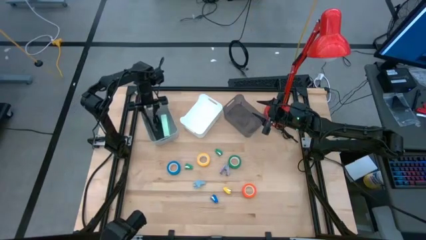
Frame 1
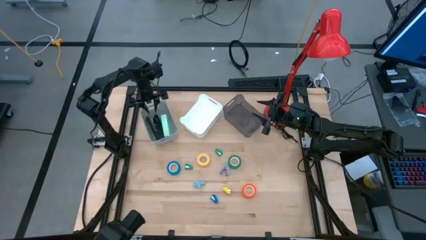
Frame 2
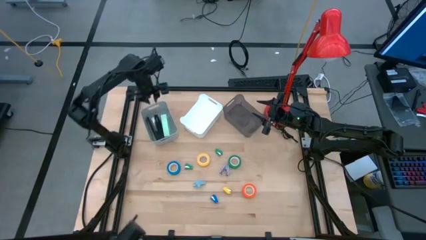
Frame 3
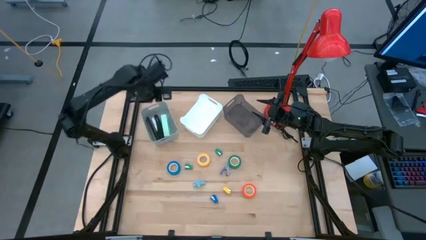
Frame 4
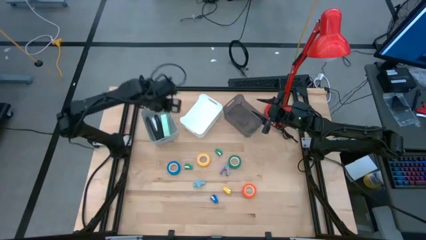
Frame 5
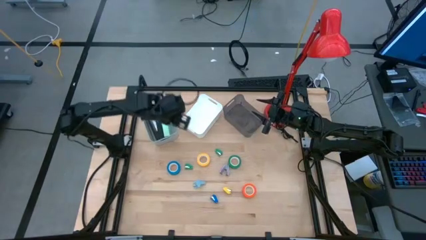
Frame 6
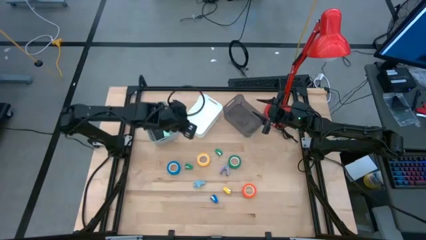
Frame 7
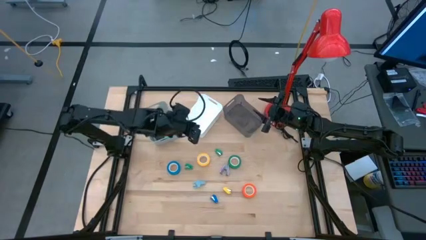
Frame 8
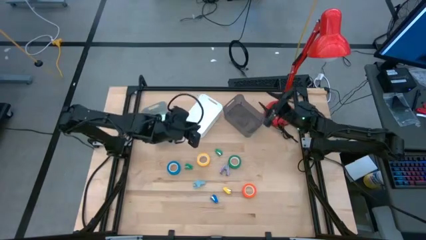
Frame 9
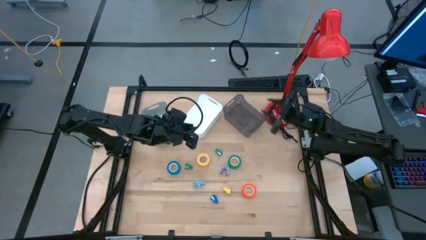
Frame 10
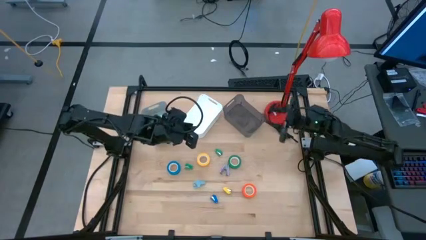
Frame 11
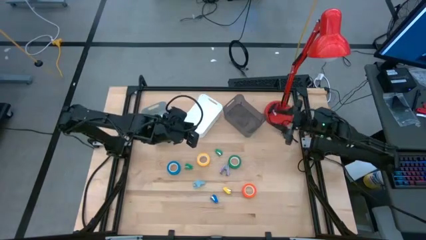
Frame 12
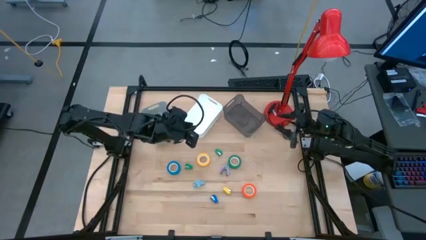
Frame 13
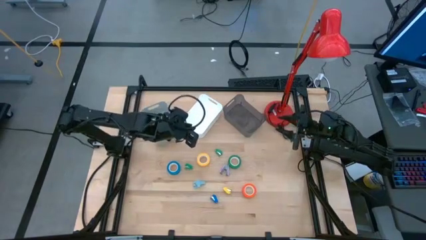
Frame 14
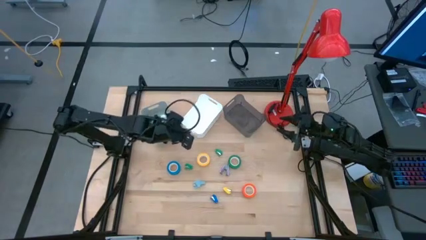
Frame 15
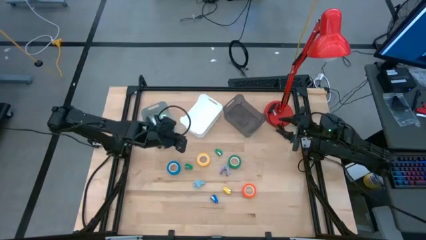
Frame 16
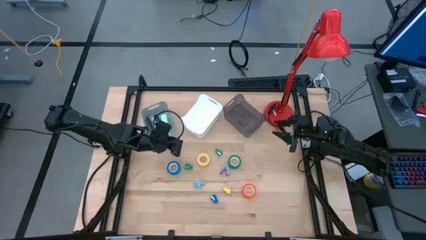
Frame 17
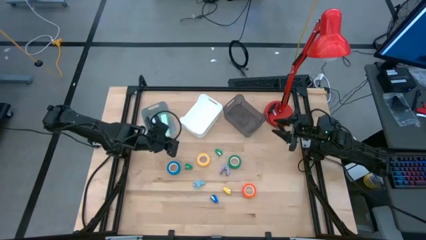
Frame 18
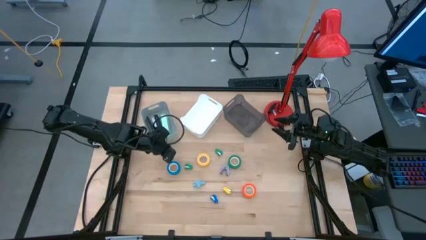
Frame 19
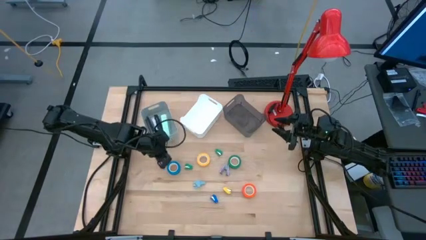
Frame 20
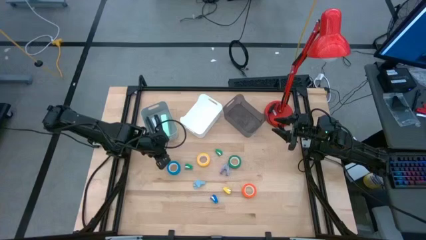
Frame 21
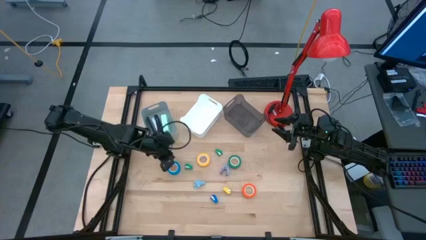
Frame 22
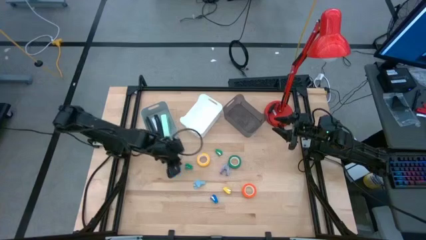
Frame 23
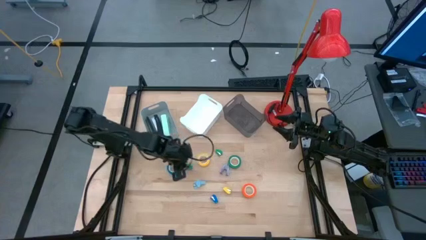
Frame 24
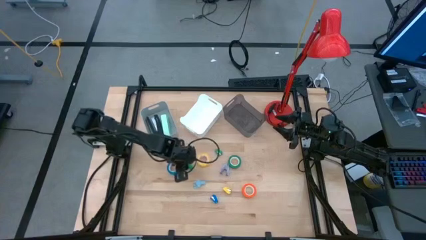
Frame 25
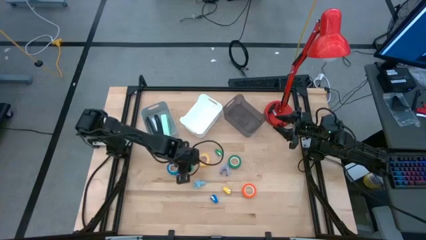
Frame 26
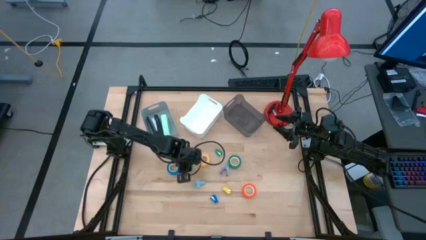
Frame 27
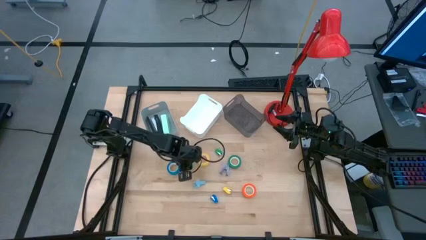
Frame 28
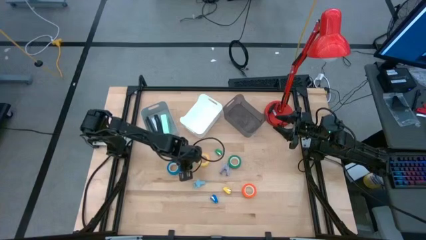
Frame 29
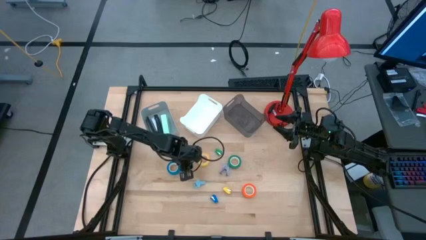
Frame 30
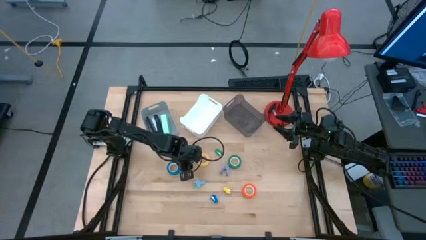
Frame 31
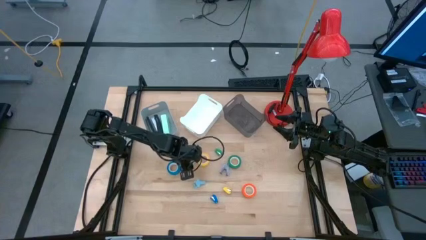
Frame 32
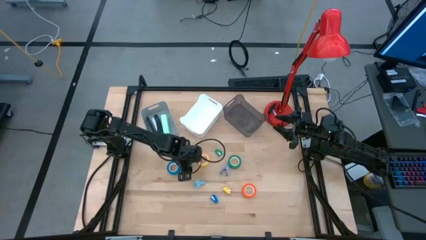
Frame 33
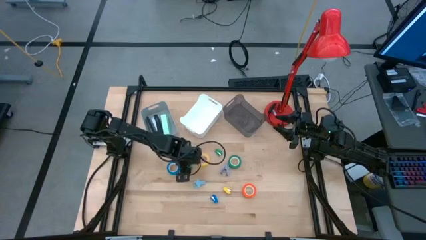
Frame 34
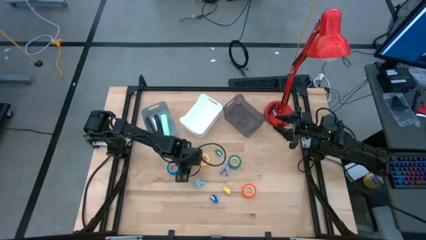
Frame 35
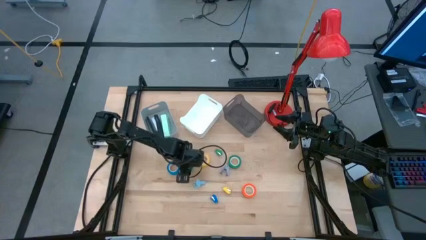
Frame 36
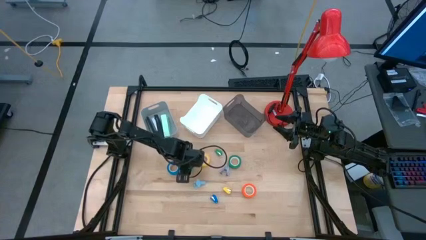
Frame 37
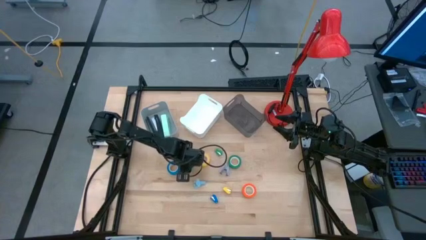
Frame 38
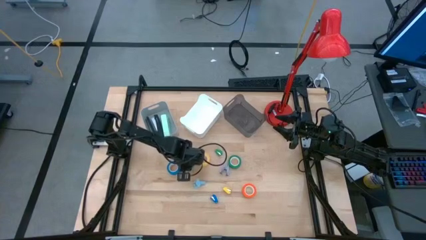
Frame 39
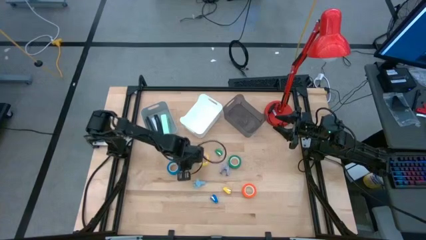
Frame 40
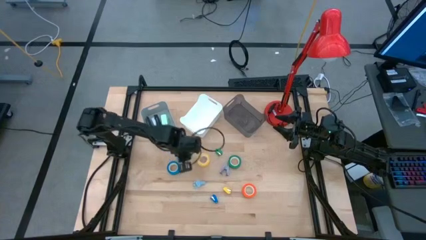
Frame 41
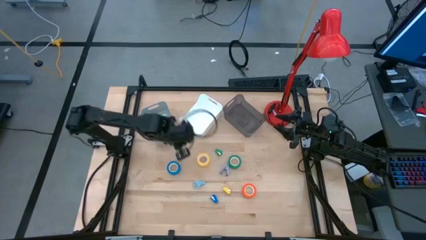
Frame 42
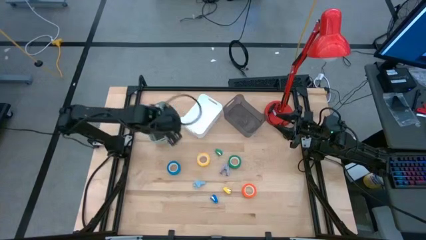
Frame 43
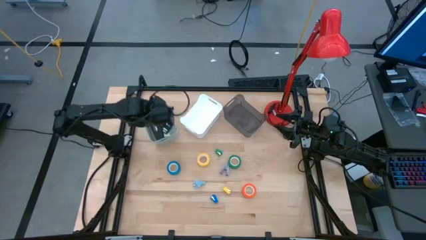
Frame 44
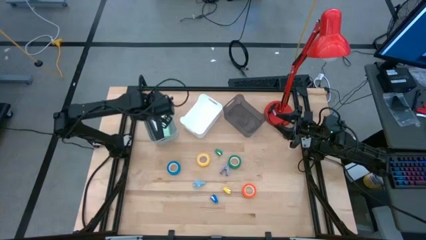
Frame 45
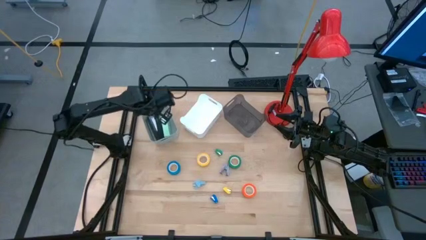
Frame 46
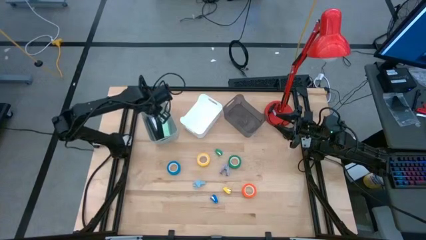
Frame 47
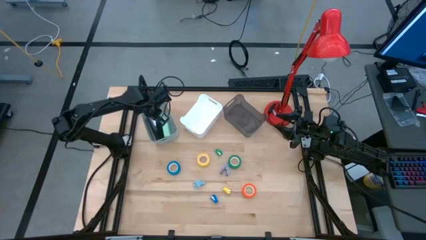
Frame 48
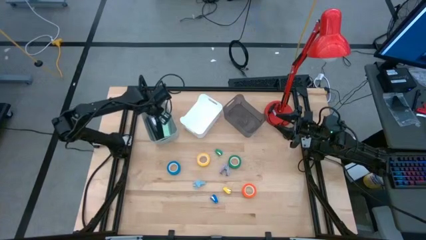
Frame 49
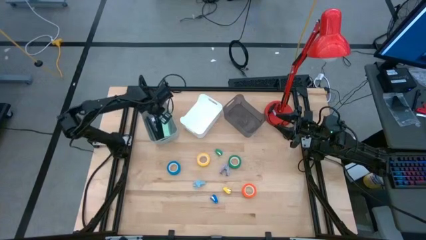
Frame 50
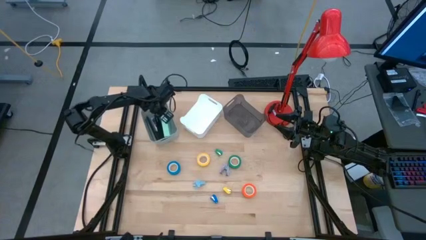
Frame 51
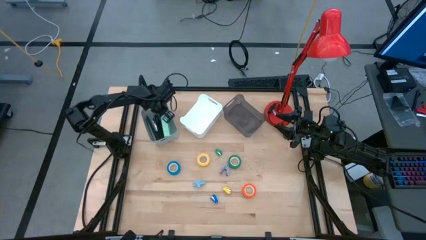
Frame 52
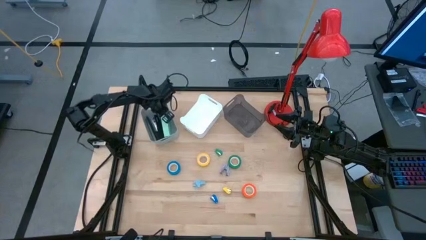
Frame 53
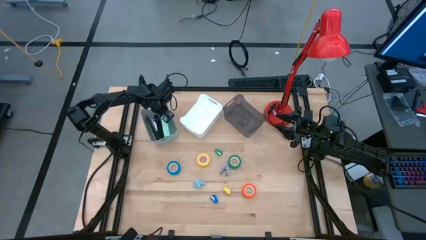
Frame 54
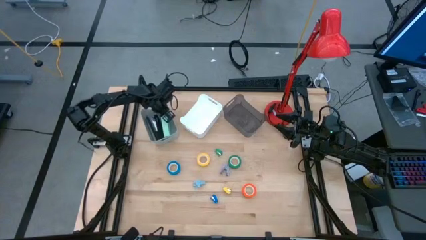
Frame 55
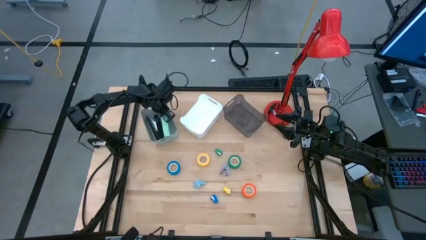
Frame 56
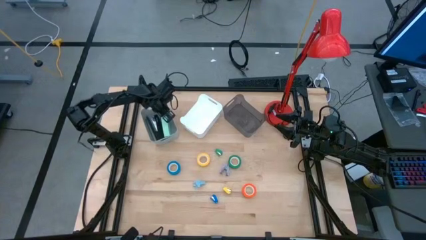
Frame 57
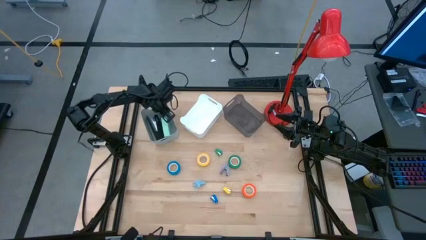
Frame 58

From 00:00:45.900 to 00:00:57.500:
Task: Pick and place Stapler, Stapler remover, tape
Put the left small green stapler into the gray bin

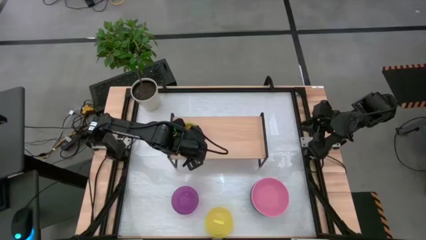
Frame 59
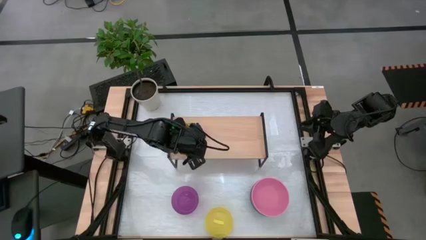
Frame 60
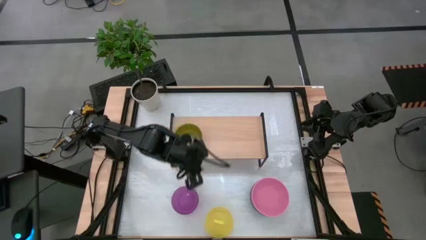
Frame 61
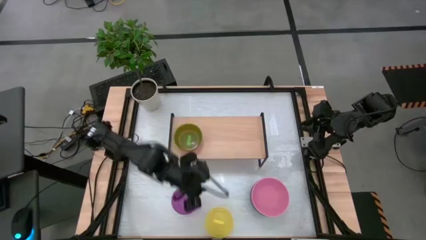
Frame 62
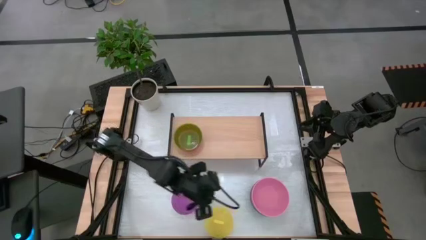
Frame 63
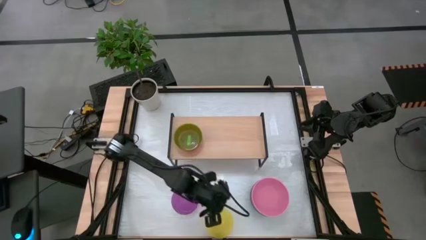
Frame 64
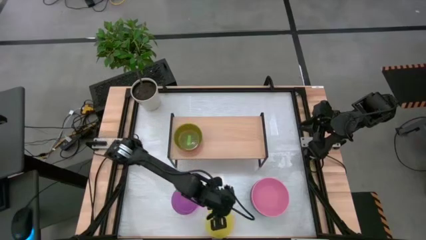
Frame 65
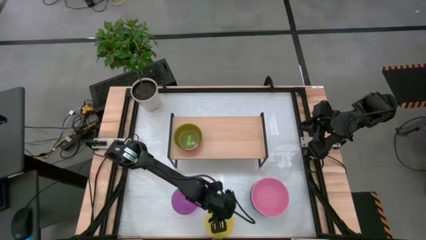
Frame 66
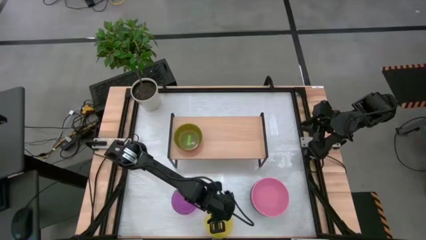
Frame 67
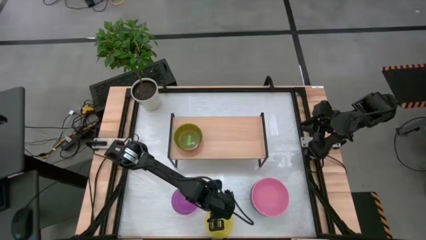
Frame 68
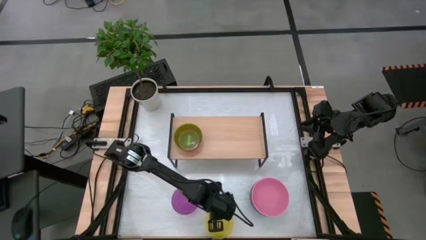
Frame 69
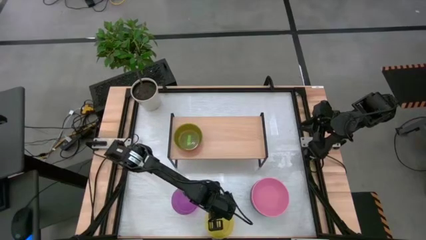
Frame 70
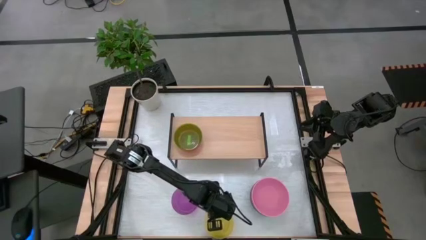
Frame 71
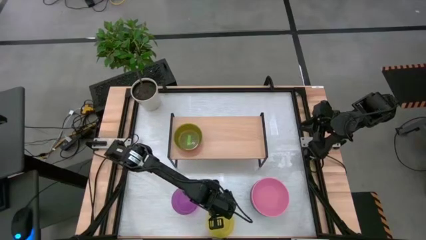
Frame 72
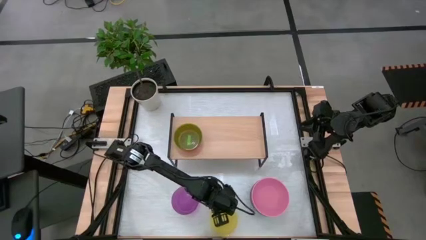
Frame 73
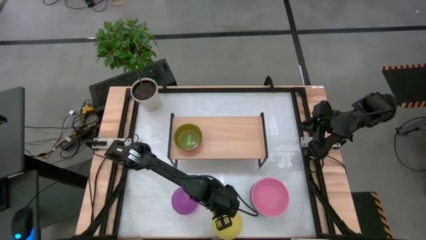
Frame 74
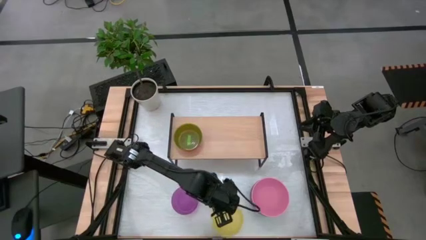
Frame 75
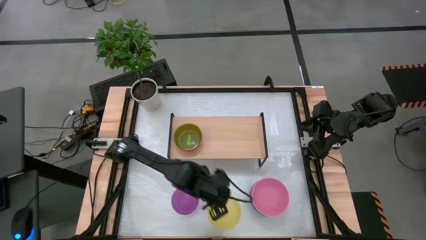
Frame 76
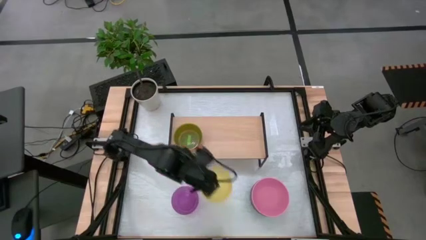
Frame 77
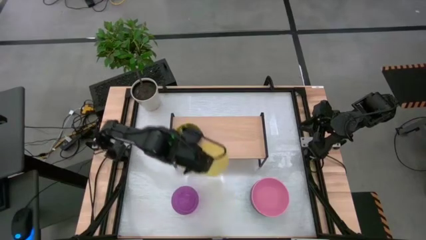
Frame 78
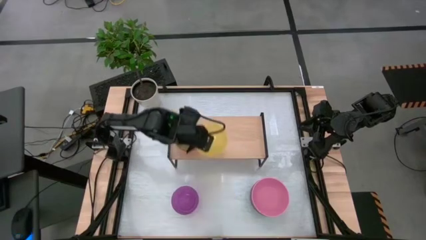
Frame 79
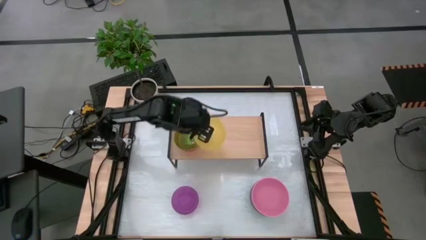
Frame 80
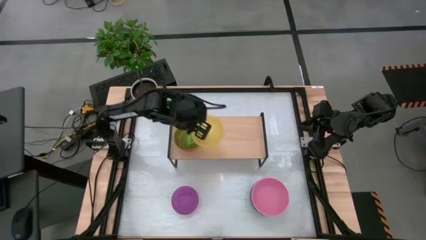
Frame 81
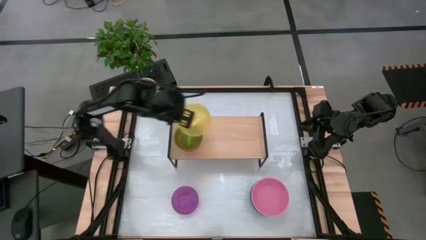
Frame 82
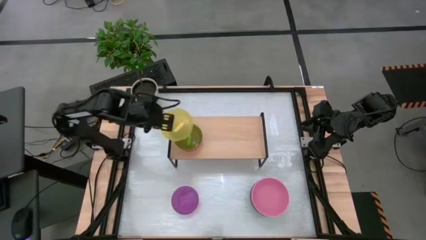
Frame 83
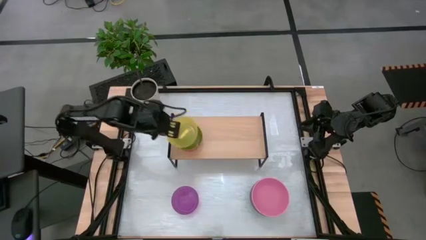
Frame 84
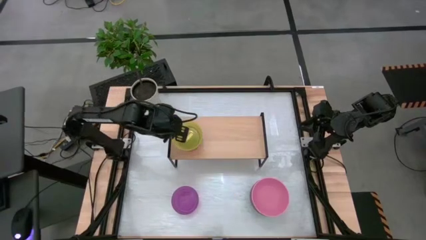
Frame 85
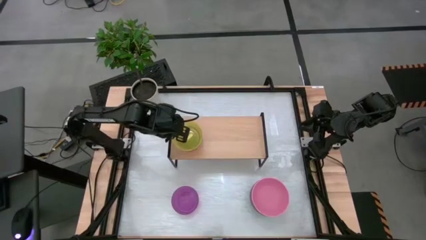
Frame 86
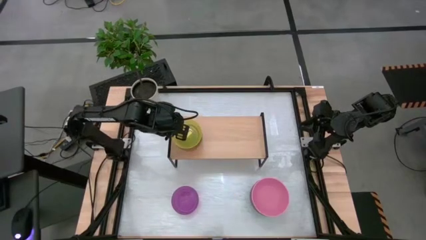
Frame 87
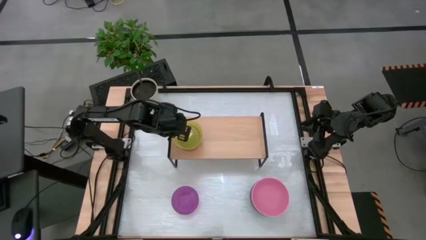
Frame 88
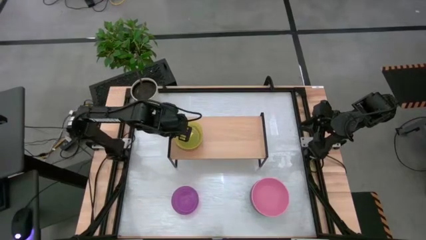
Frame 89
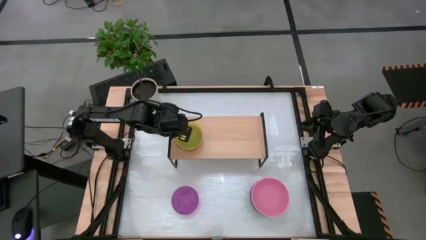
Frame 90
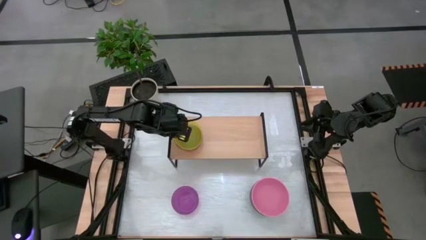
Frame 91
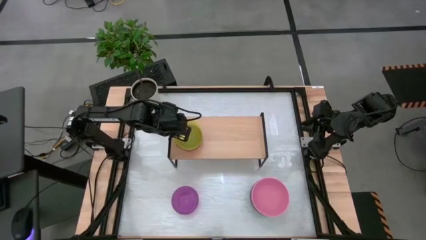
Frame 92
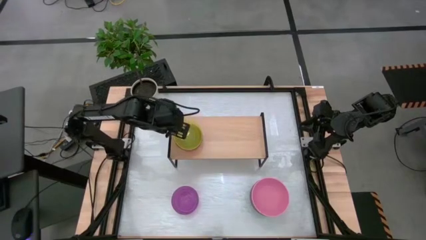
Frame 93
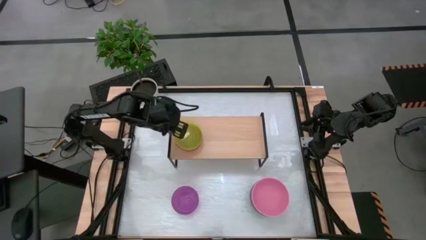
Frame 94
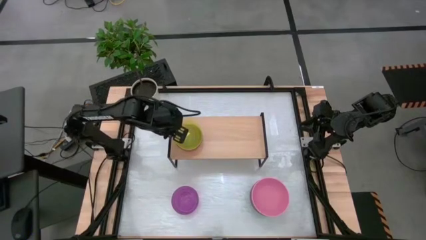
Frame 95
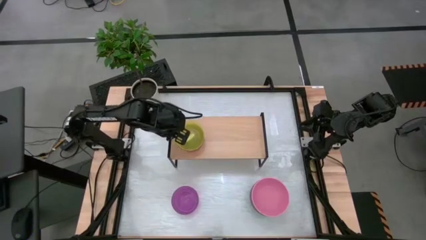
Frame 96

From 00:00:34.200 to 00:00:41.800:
Task: Place and stack bowls onto a shelf
Stack the small yellow bowl on top of the green bowl on the shelf
